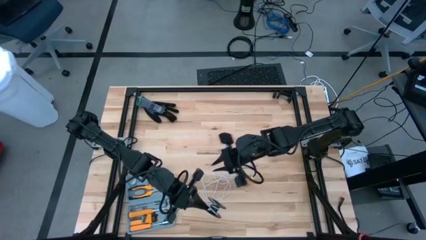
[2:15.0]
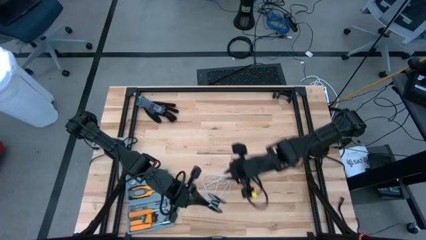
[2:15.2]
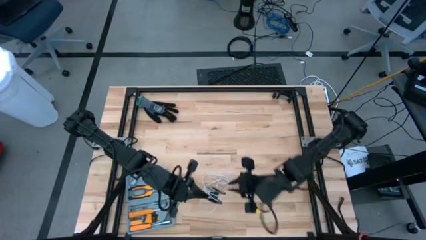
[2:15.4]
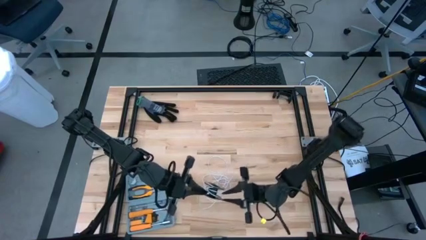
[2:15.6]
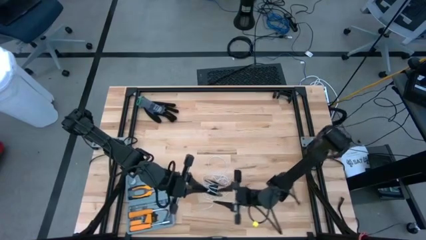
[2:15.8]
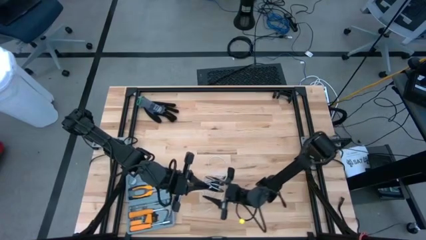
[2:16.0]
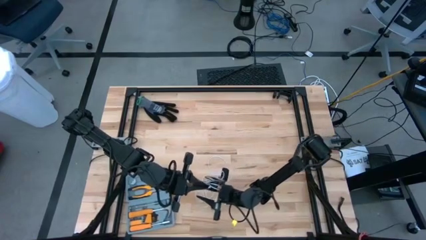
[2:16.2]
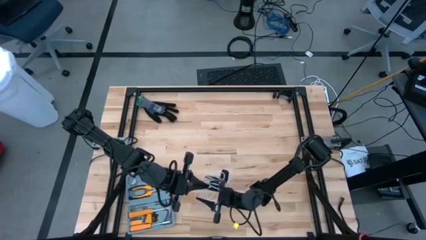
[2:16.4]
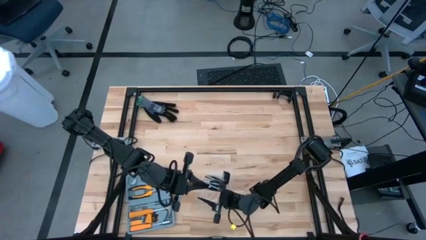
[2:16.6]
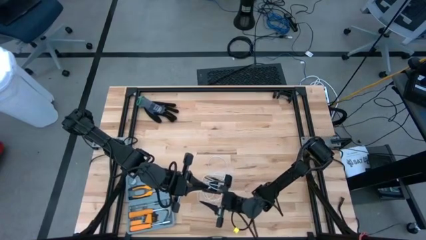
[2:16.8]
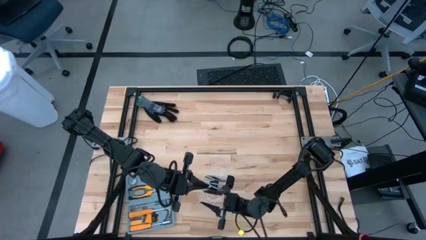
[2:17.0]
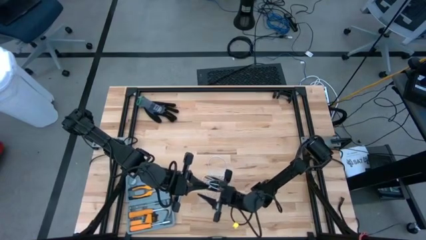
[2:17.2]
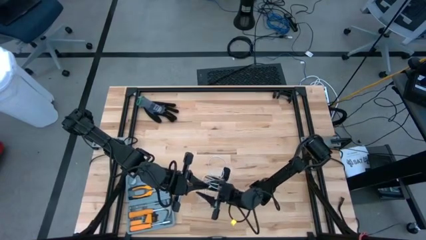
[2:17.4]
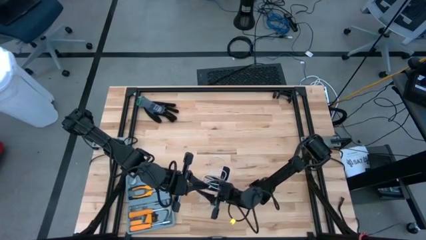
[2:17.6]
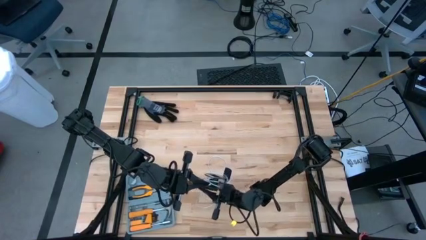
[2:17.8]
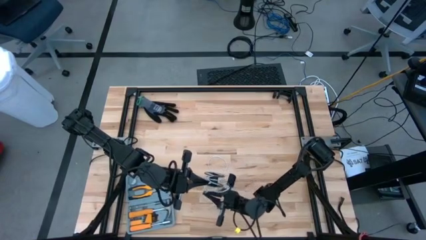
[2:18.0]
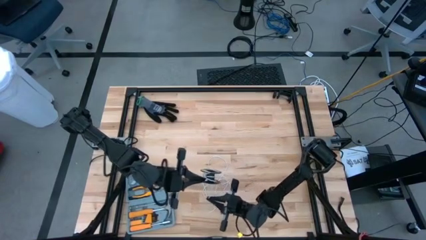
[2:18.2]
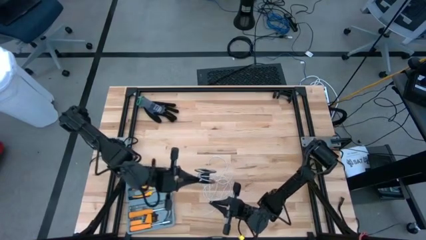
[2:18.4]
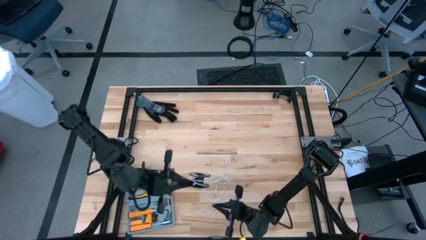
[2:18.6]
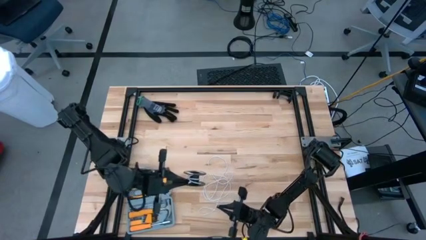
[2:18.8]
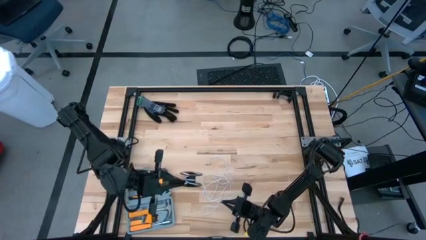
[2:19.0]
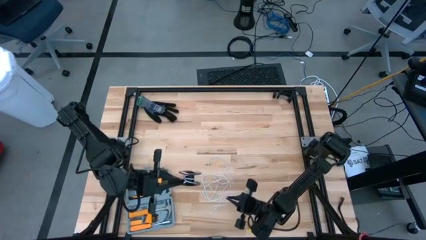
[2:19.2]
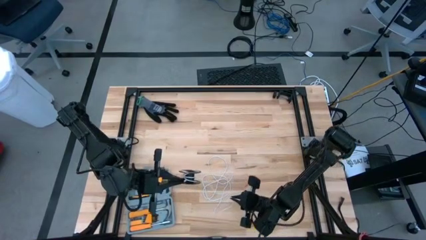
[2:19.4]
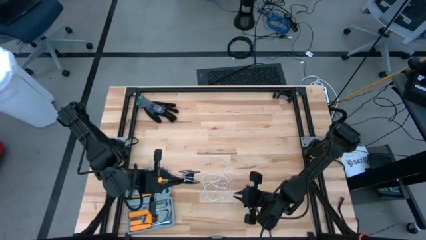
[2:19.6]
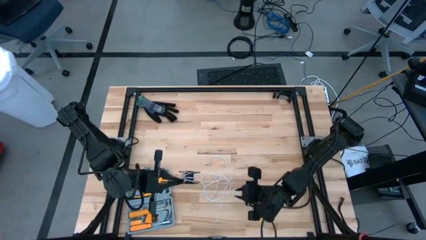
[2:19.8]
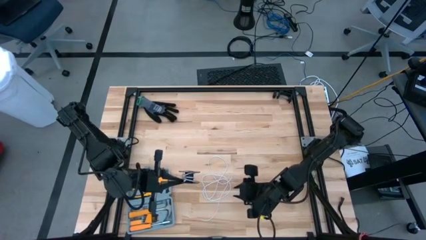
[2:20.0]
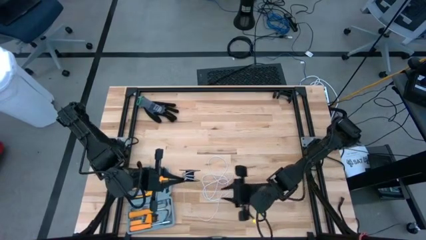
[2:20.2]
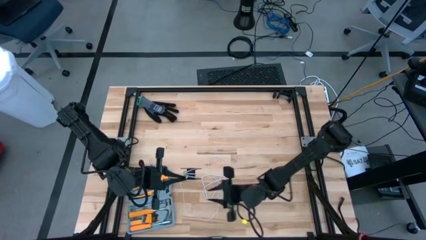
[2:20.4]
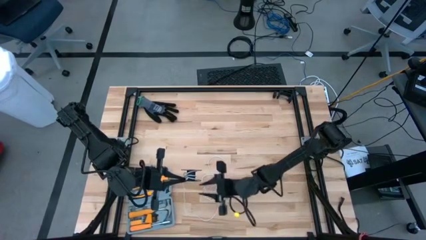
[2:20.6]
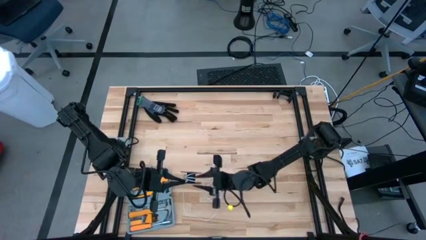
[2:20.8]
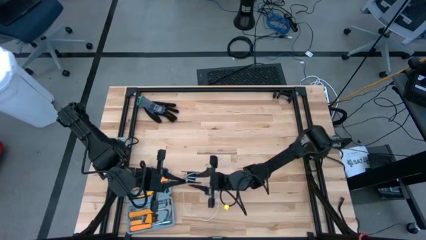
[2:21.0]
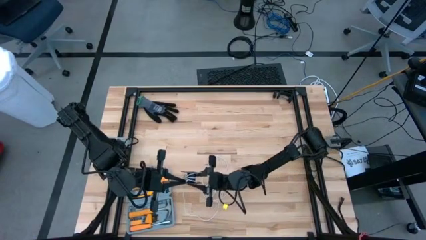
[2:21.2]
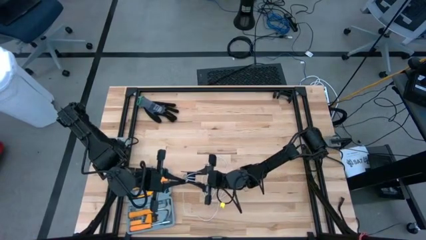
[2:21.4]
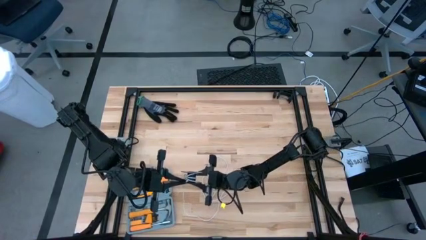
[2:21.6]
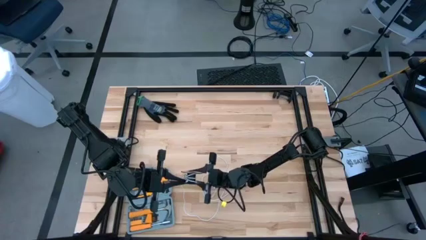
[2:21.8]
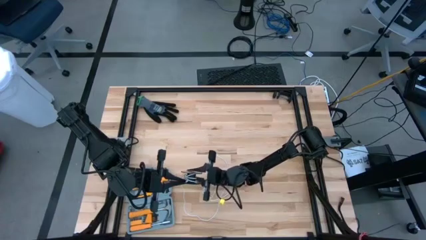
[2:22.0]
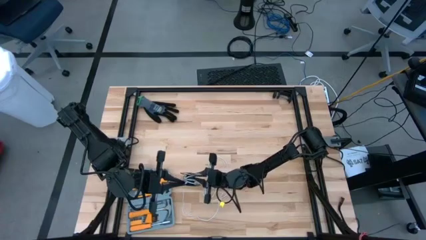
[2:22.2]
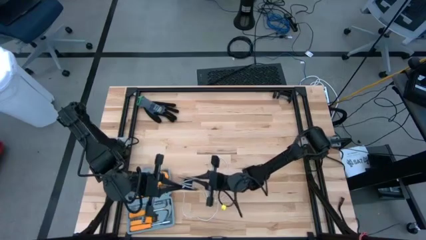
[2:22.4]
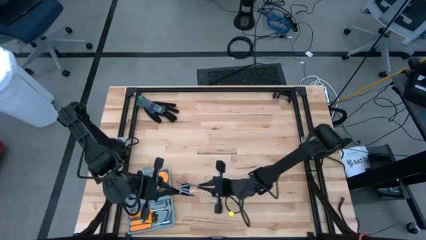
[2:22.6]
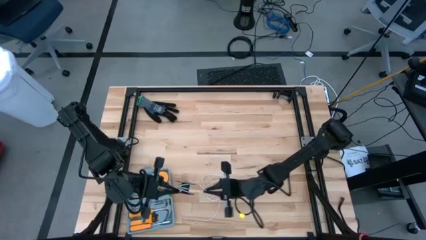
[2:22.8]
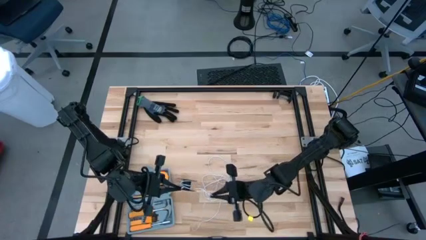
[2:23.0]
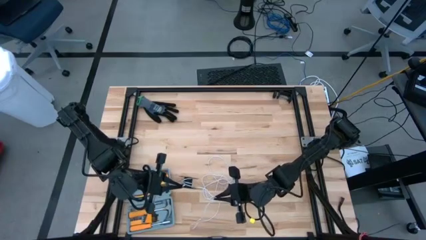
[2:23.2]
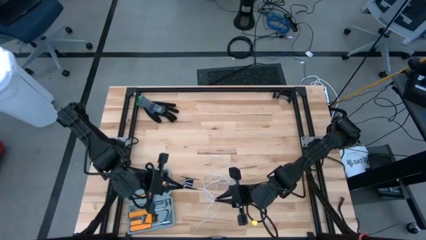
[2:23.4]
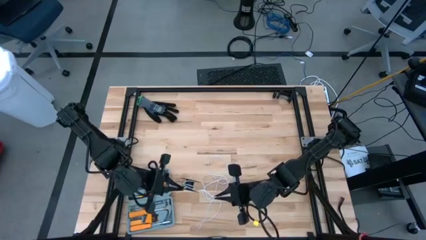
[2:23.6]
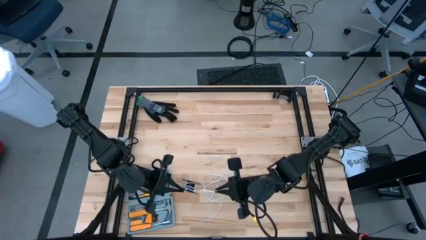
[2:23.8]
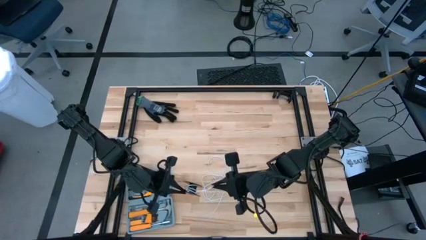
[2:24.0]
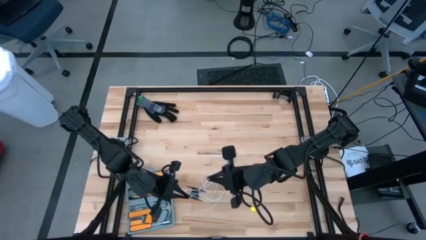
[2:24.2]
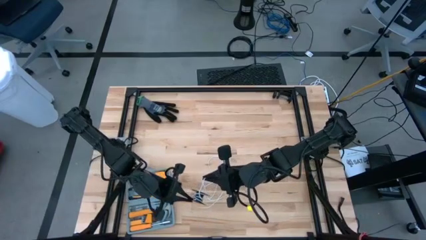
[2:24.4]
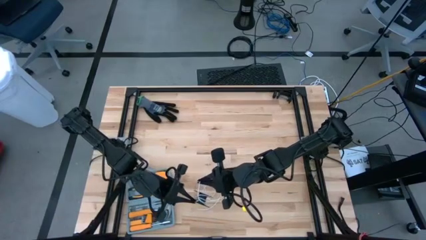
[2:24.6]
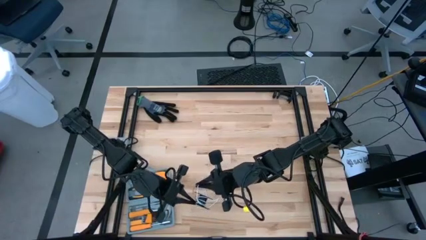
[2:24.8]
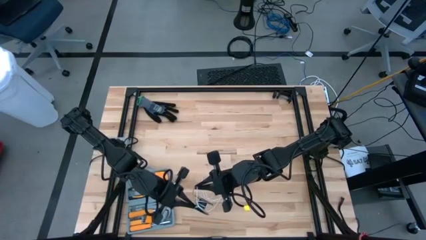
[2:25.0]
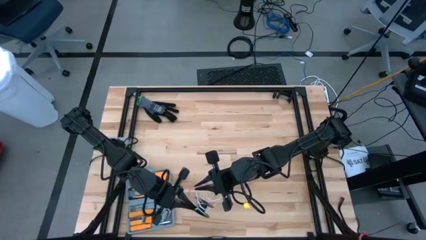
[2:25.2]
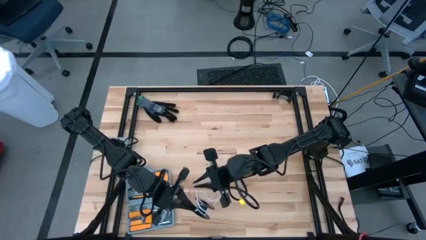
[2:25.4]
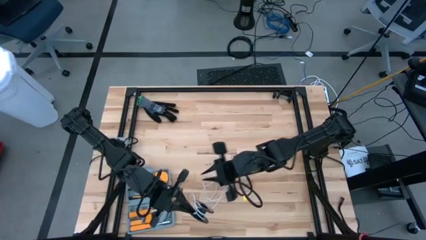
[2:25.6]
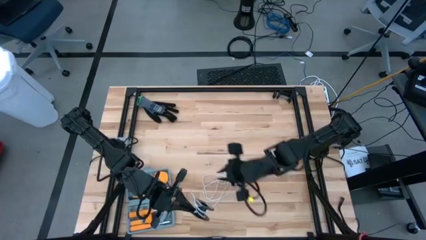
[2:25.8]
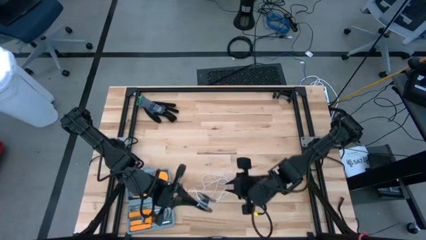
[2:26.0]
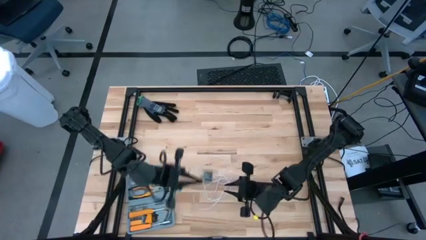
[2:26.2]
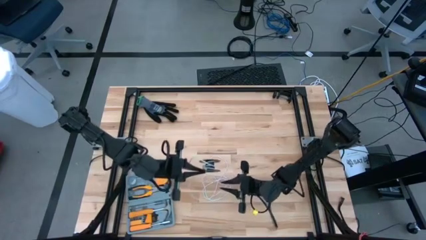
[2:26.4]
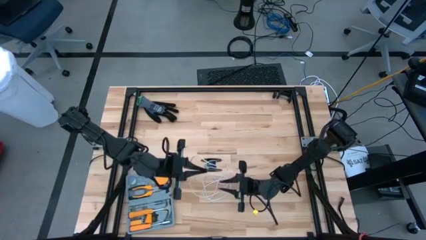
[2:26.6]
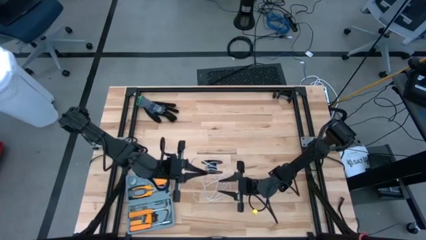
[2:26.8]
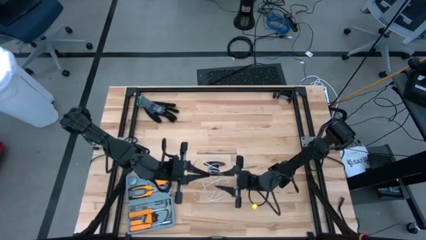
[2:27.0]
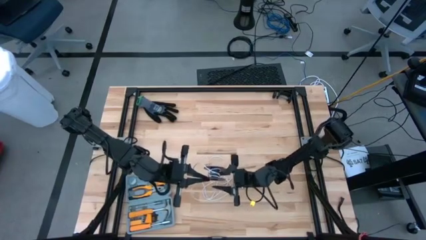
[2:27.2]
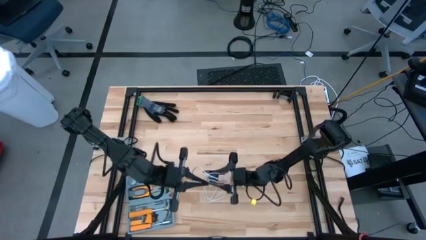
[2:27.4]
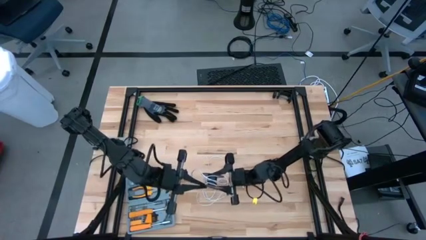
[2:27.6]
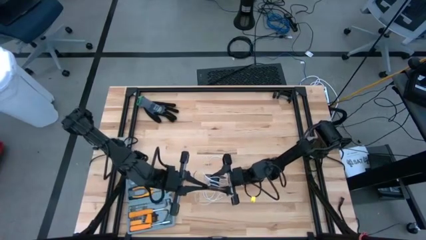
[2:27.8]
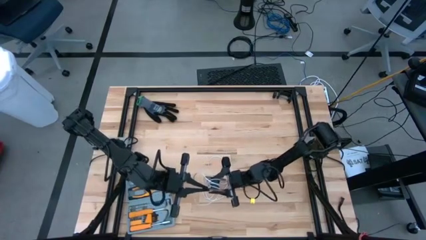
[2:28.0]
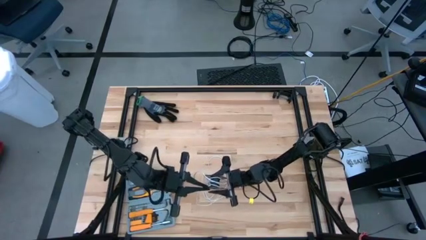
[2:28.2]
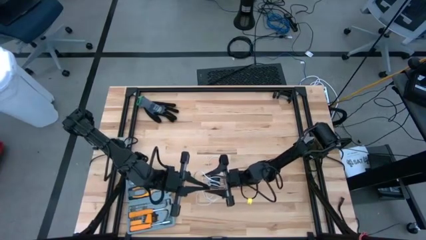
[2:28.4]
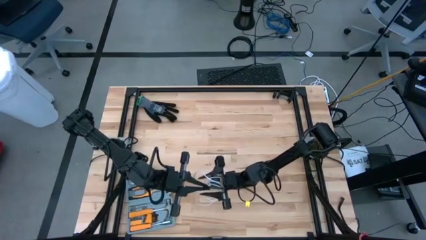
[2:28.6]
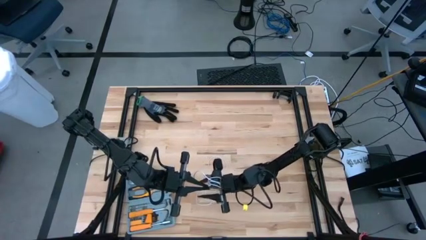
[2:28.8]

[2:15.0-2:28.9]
Task: Coil cords
Coil the white cable wire into the spool

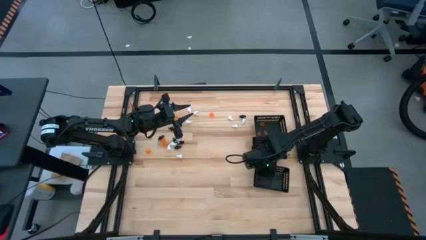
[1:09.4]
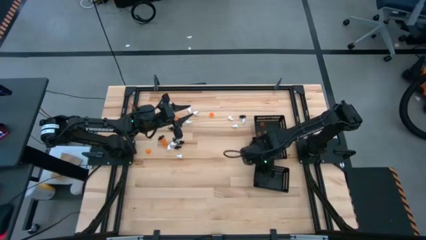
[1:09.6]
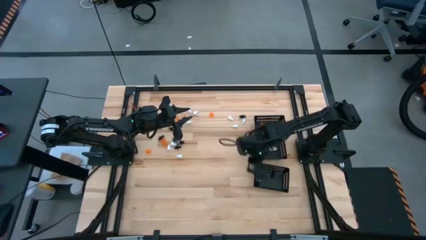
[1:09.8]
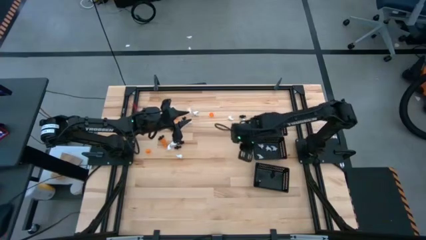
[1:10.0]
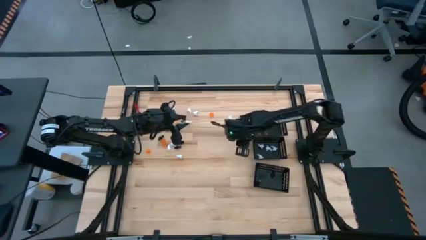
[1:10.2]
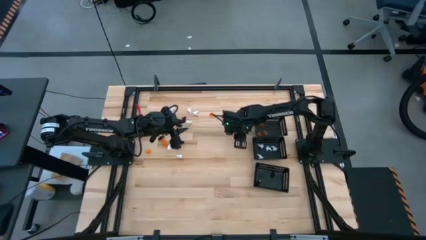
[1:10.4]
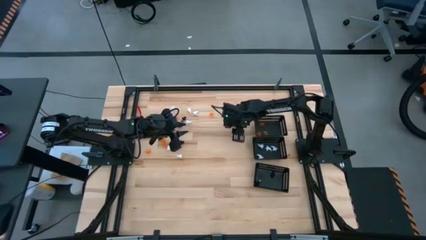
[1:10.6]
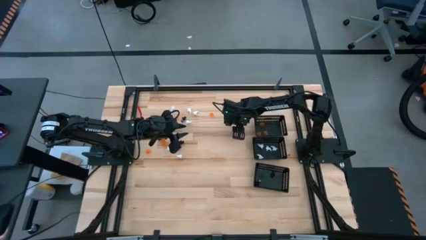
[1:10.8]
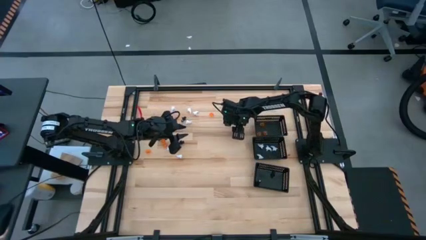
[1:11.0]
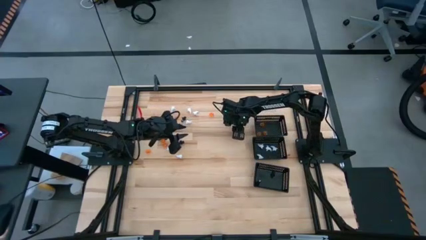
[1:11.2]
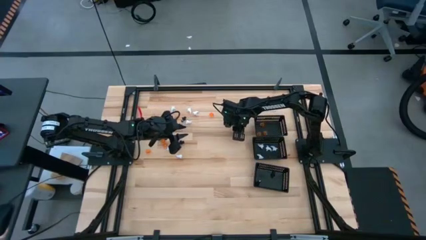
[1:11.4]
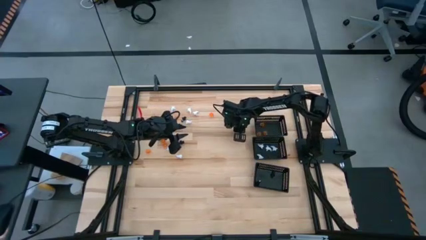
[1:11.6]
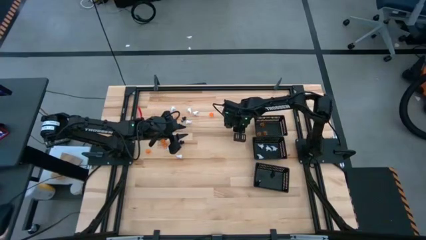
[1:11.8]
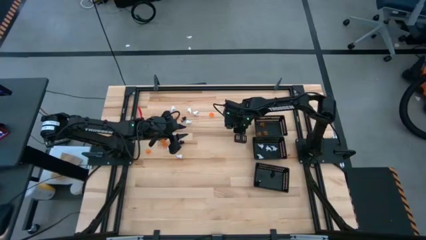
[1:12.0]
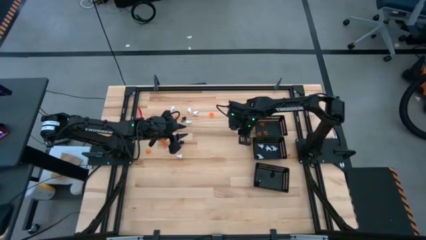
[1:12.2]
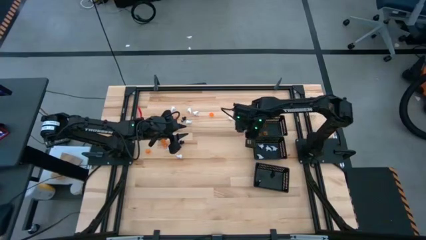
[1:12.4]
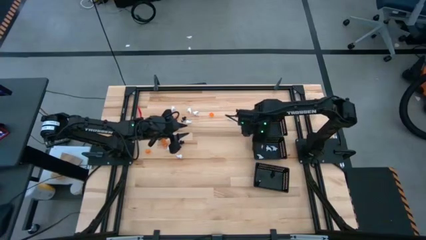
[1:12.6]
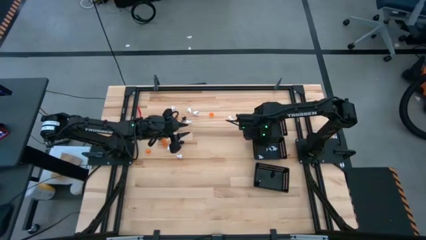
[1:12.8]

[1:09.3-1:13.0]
Task: Sort Halloween decoration
Put the white ghost toy into the center black bin
